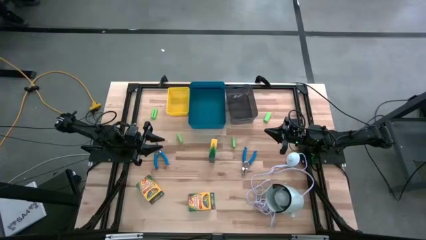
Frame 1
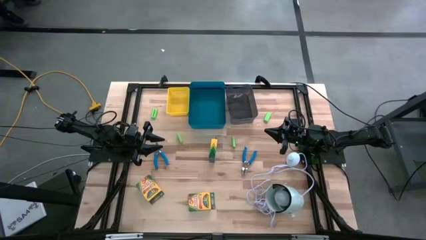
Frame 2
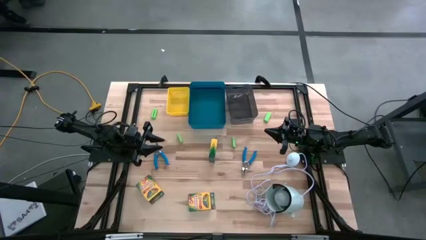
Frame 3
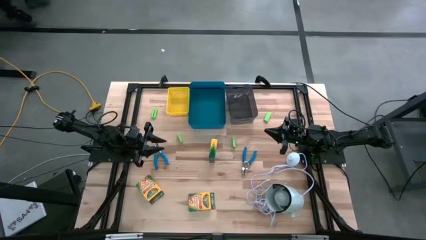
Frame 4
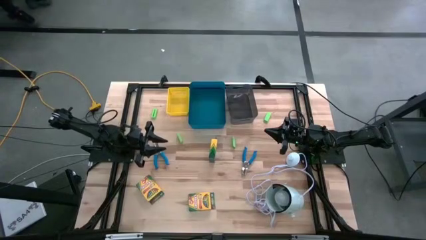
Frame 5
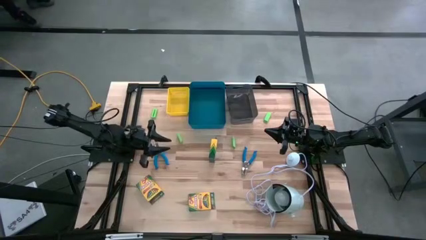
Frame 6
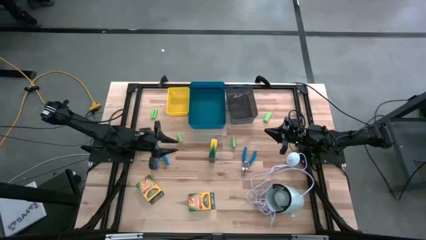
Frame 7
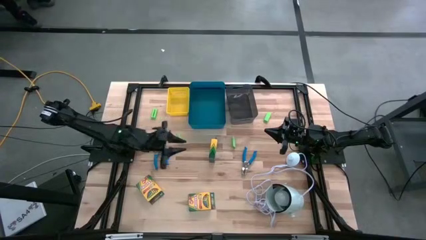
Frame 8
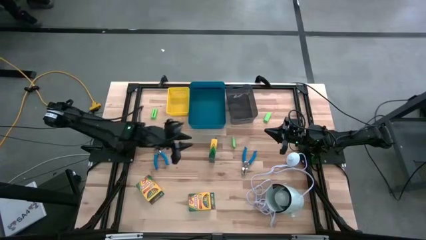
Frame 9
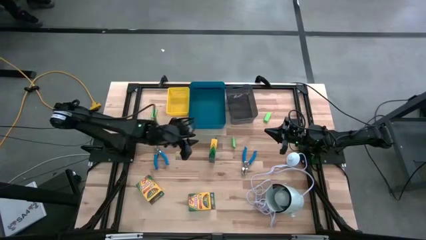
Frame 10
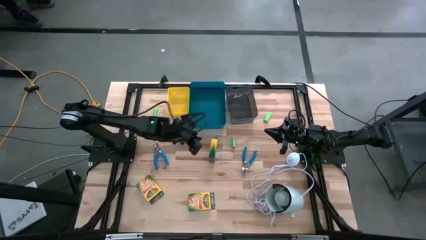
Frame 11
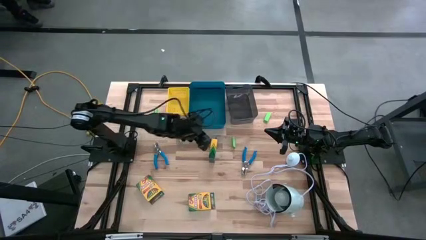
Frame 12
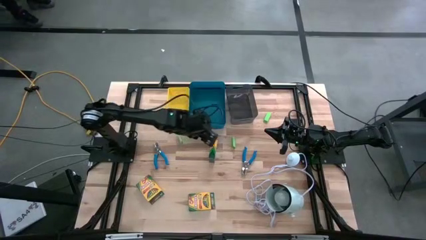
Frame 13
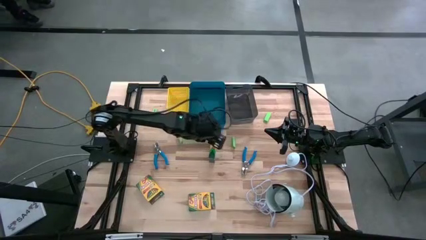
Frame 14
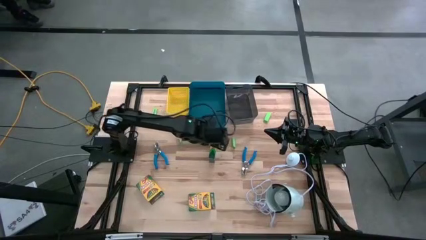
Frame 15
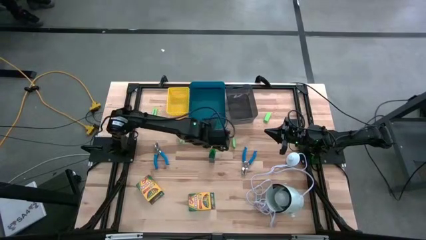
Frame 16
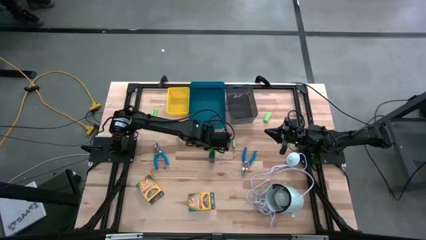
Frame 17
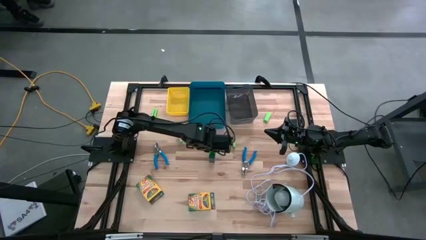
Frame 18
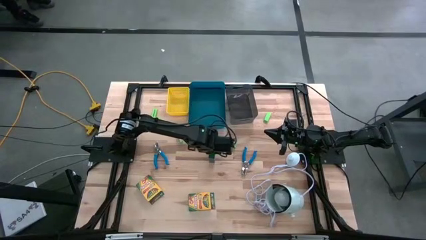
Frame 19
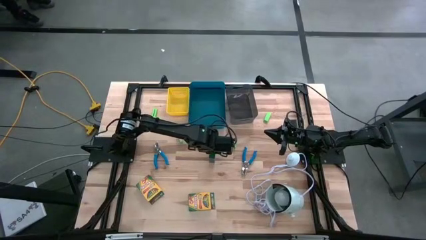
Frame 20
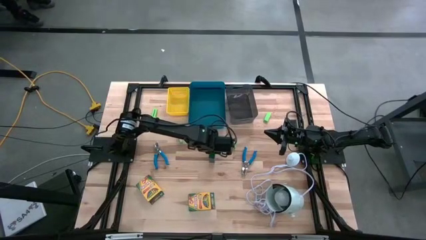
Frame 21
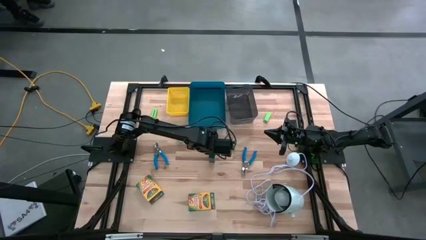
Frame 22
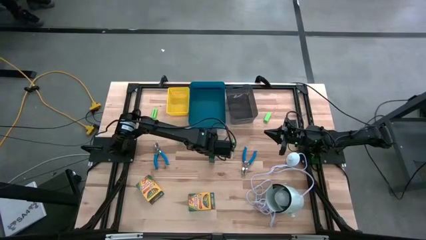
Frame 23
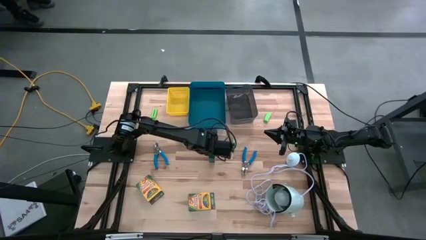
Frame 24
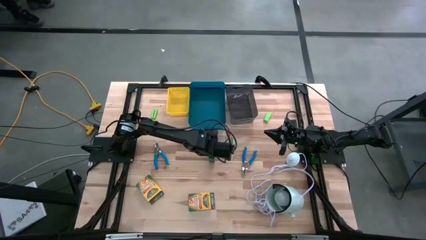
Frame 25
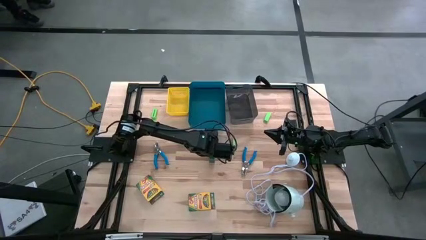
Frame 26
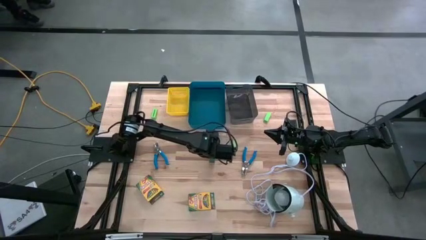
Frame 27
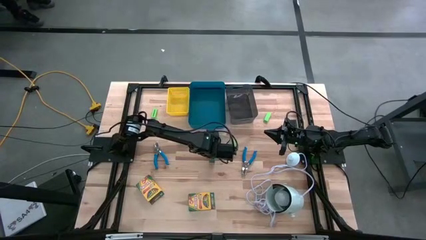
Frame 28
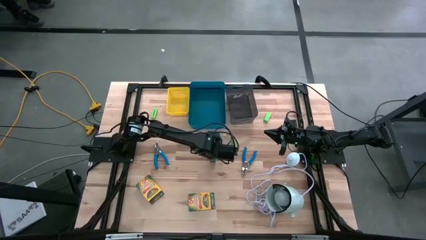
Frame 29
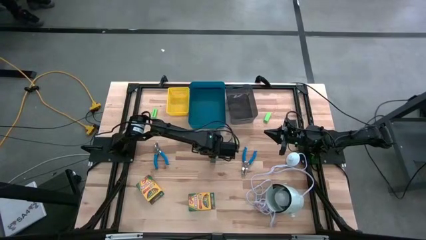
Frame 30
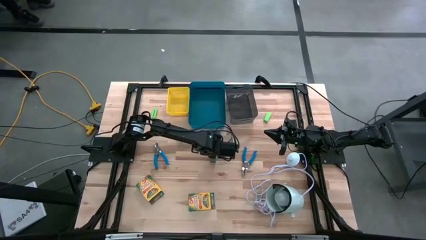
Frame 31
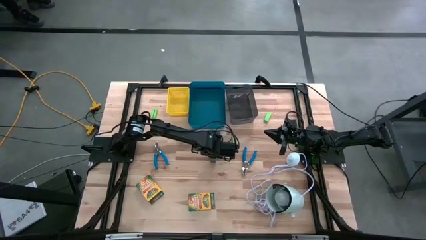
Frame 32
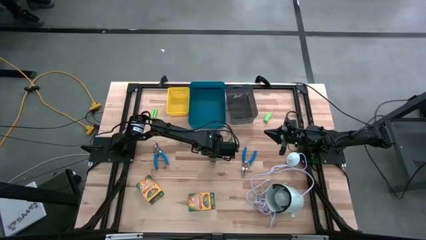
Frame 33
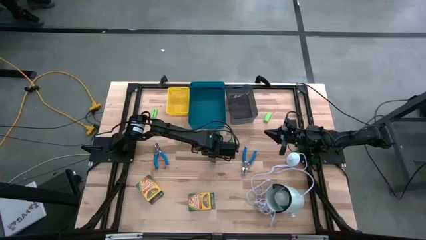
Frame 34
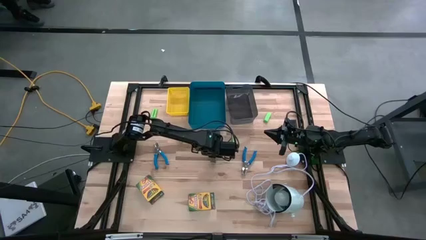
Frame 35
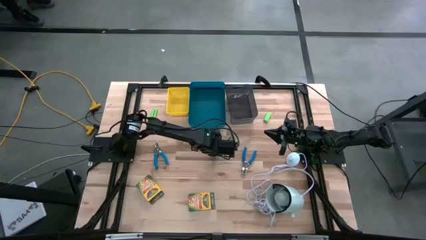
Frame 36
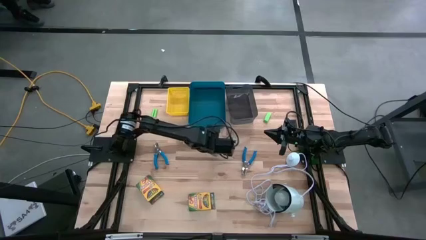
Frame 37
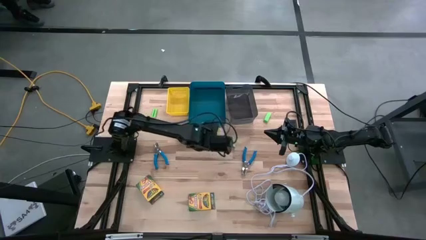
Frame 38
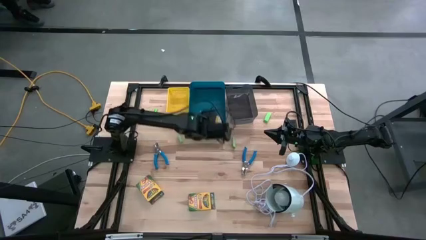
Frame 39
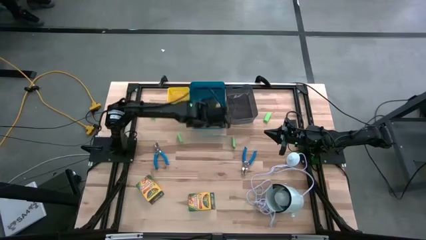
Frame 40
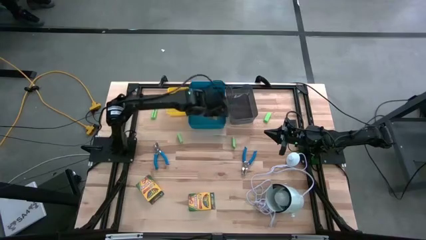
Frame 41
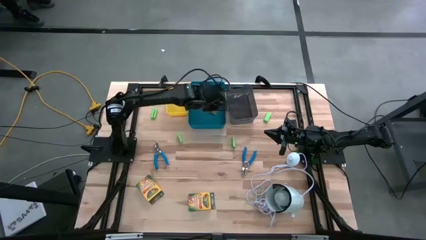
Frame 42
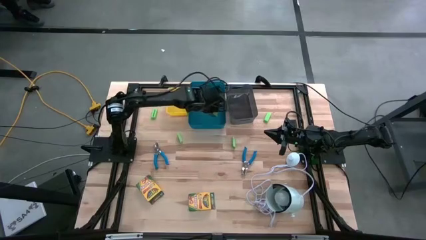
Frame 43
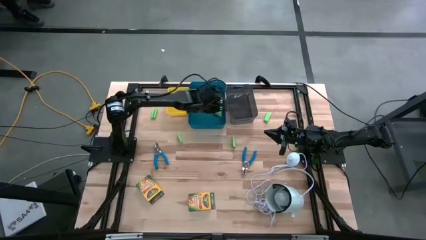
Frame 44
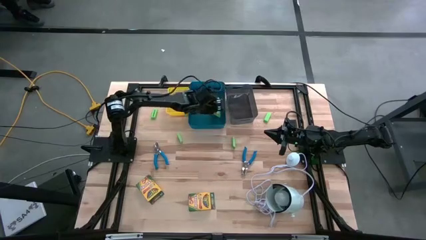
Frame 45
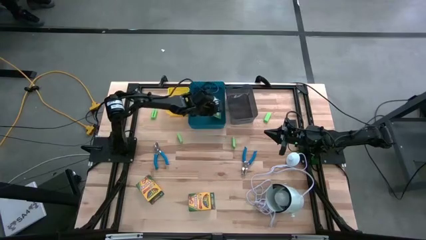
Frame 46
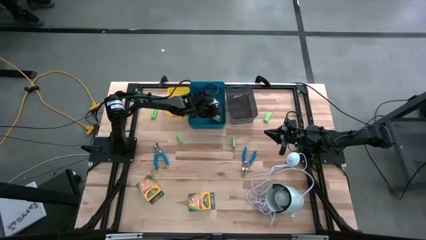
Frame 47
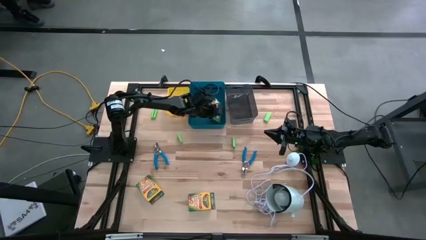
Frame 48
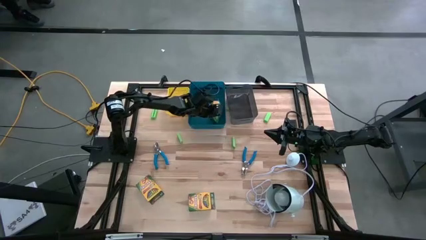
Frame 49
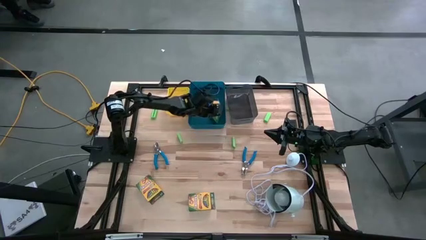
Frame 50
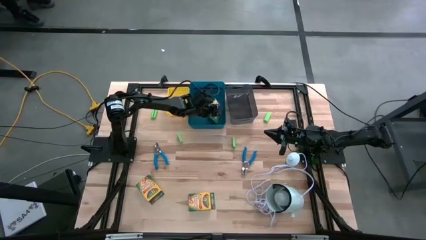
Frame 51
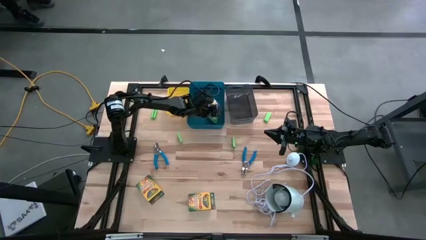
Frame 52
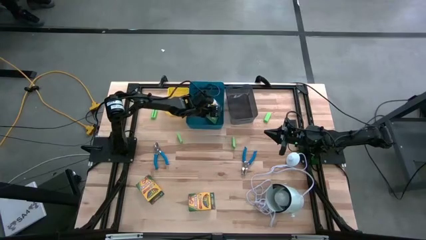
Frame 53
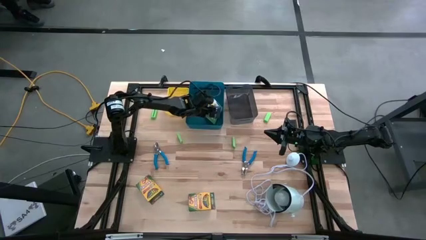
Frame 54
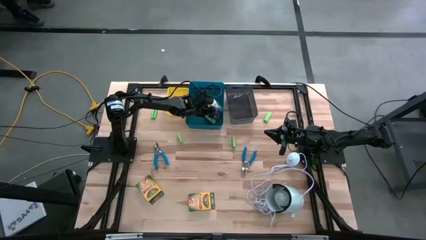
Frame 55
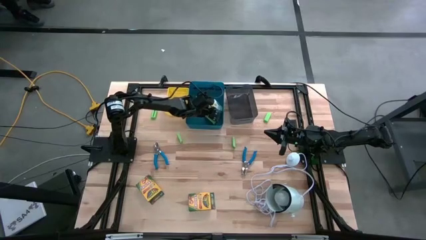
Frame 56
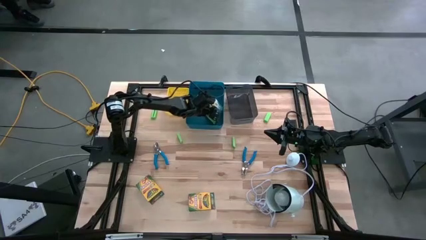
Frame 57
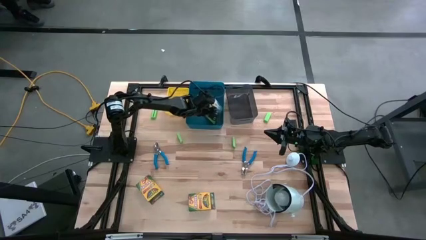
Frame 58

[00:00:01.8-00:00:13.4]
Task: Pick & Place School Supplies
Put the crayon box into the blue bin
